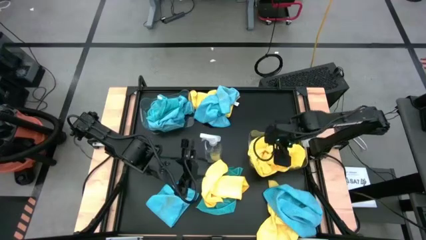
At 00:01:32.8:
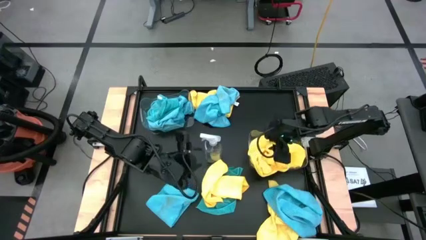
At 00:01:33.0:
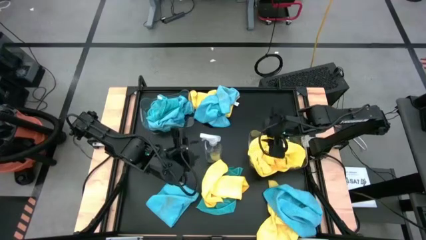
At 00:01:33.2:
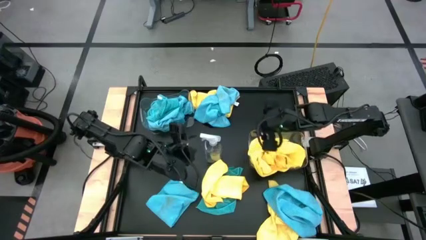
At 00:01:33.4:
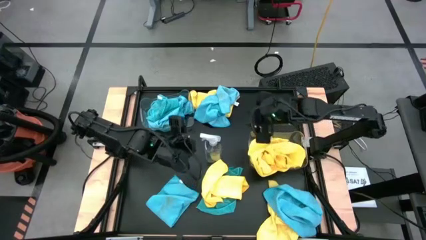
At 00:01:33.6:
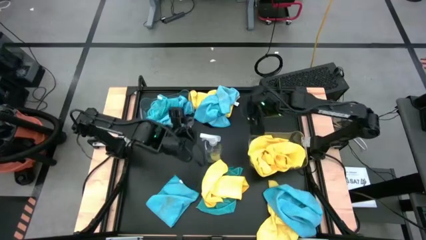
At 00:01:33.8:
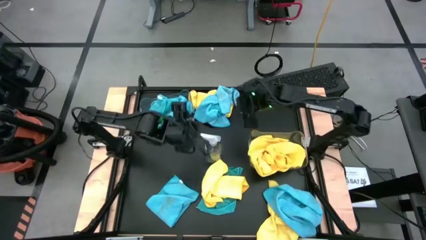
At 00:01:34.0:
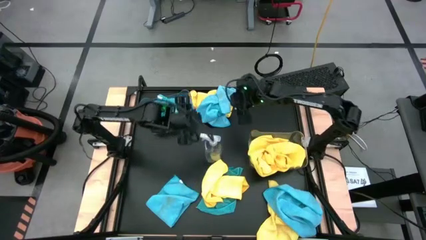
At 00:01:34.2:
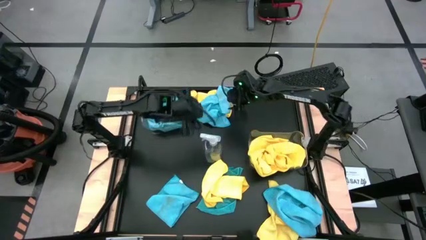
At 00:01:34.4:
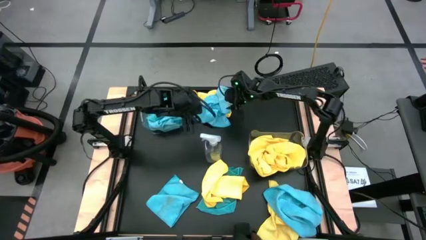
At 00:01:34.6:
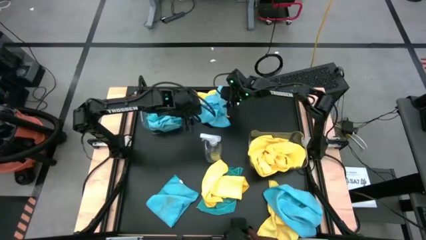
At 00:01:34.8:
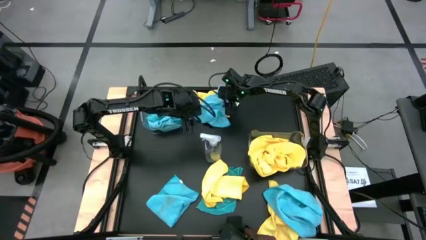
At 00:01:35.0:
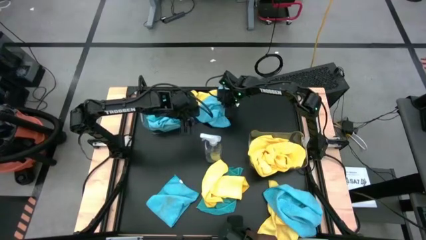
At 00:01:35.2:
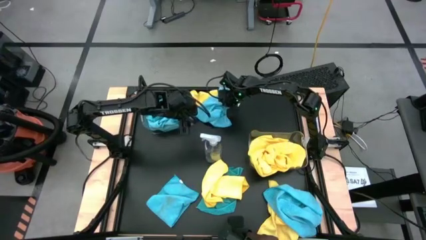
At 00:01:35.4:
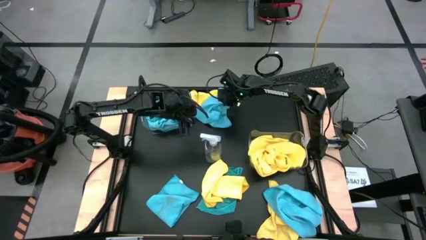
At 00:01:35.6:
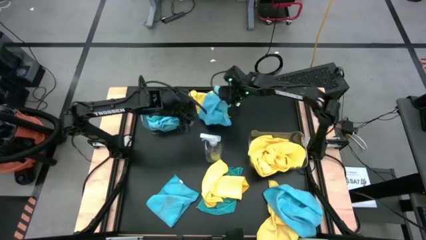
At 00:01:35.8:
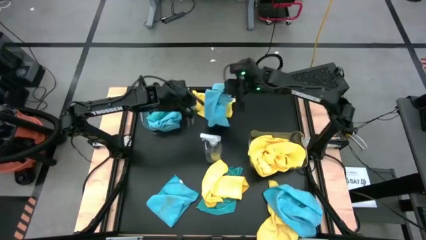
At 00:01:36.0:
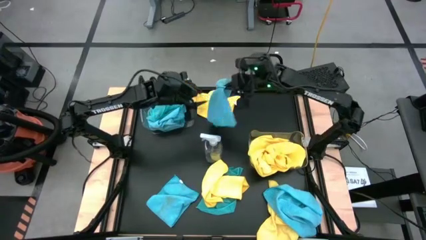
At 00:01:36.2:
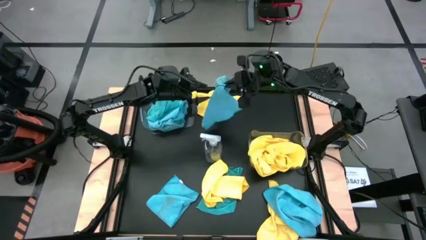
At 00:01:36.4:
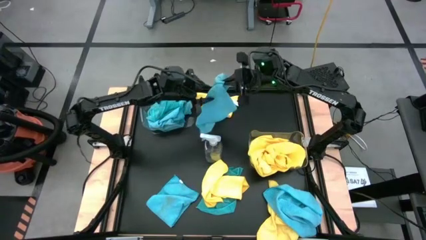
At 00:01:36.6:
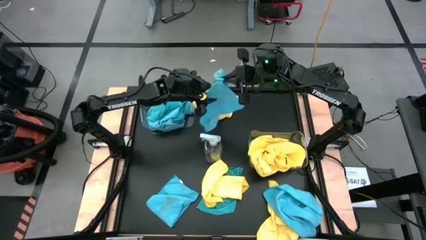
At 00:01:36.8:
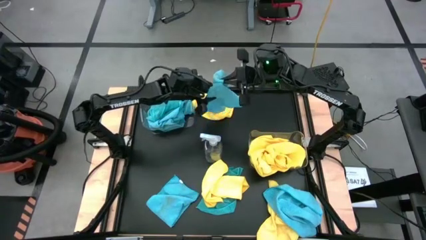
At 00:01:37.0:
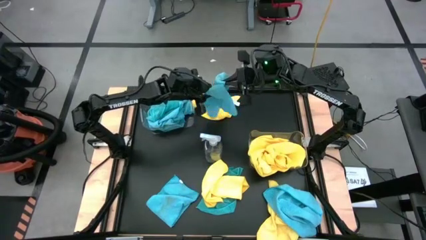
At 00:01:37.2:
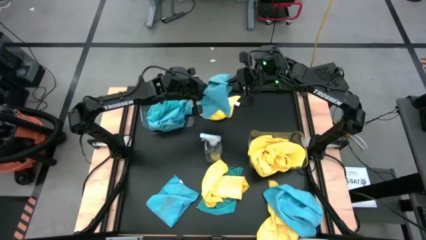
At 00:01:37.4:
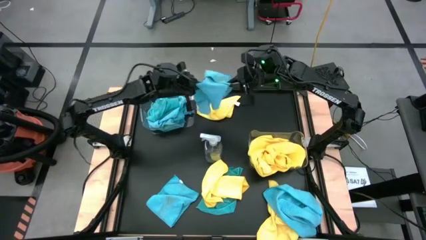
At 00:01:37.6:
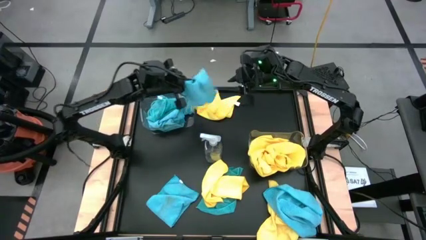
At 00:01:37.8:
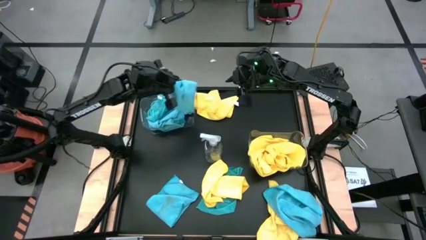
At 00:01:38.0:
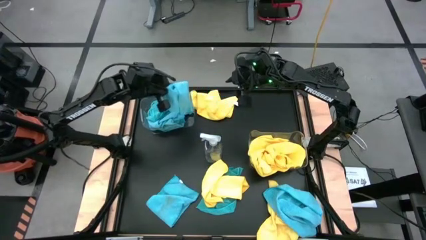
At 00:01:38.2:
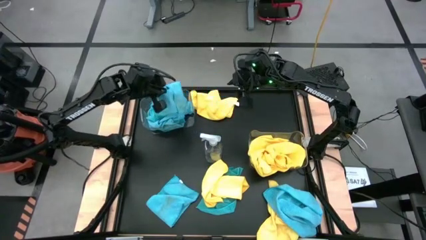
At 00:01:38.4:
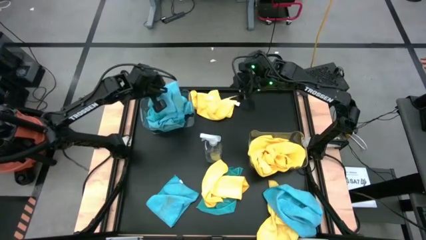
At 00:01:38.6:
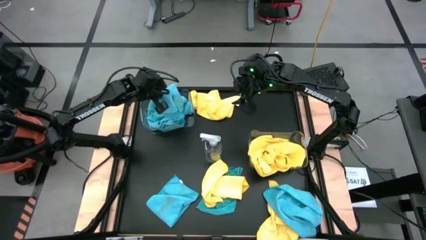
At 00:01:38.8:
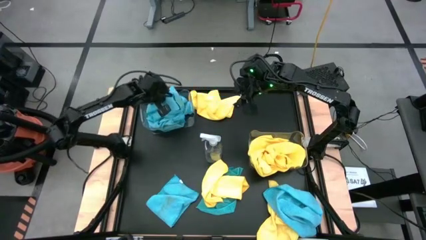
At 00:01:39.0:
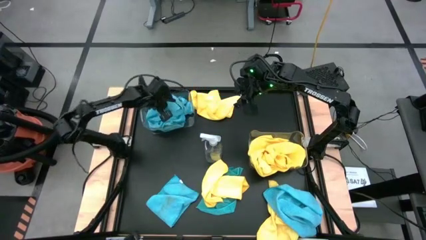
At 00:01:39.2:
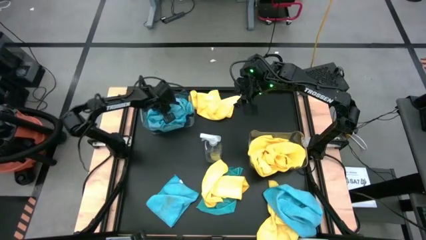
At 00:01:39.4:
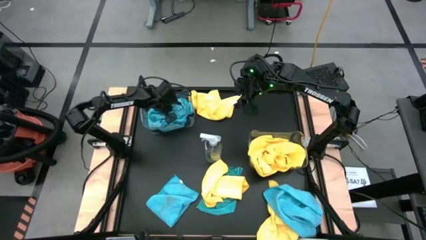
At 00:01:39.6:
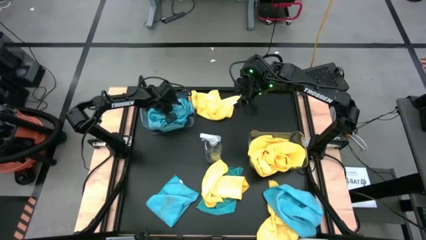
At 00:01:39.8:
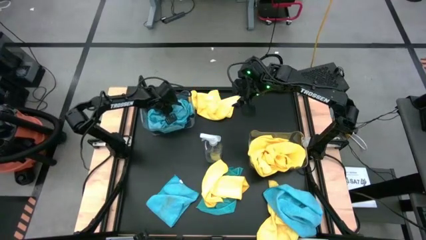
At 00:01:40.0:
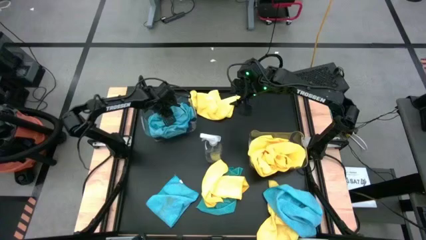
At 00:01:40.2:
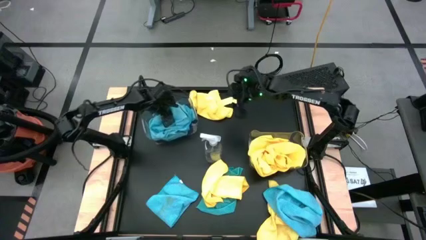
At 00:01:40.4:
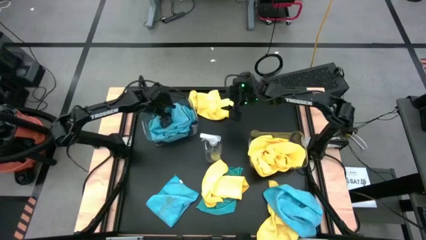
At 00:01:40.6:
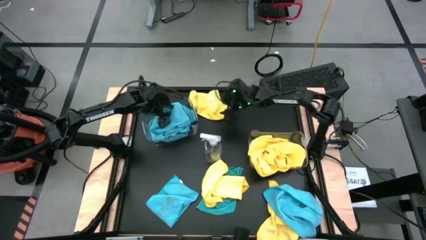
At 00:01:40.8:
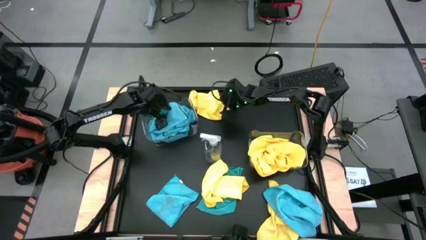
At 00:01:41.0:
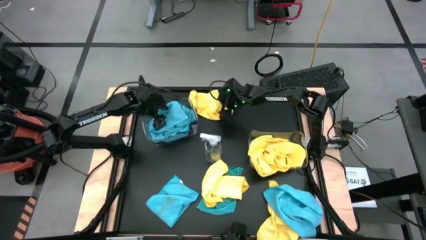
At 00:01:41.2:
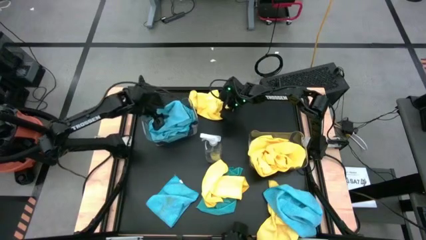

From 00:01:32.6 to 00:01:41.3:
Task: Sort microfiber towel by color & place in baskets
Put the blue microfiber towel into the top transparent bin

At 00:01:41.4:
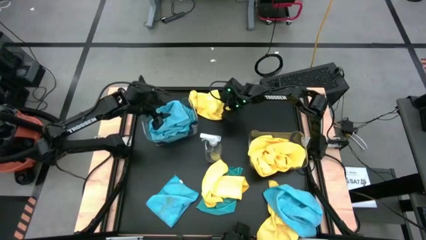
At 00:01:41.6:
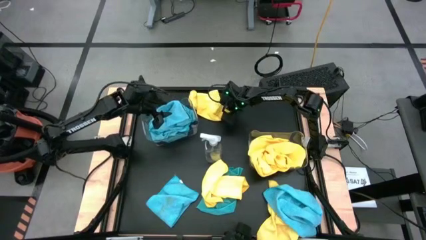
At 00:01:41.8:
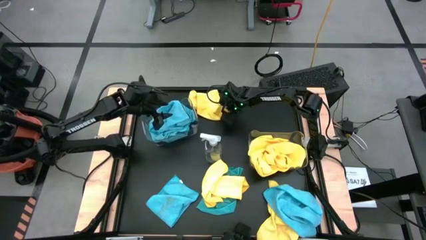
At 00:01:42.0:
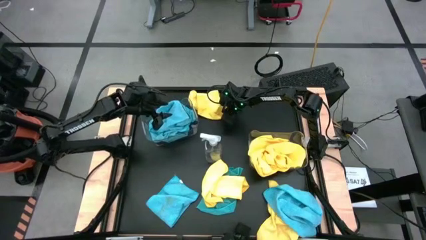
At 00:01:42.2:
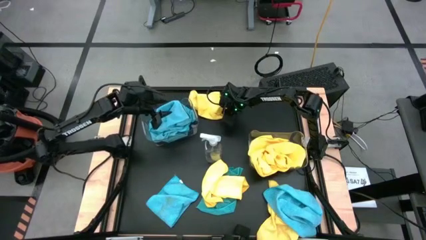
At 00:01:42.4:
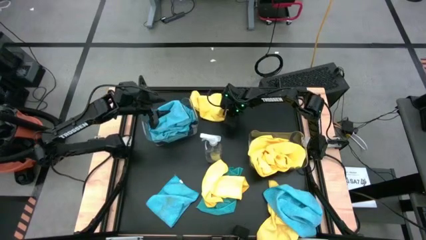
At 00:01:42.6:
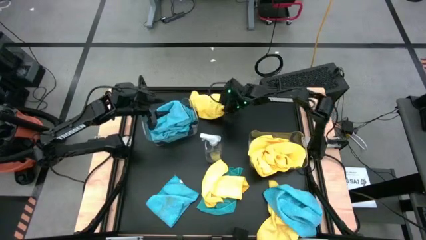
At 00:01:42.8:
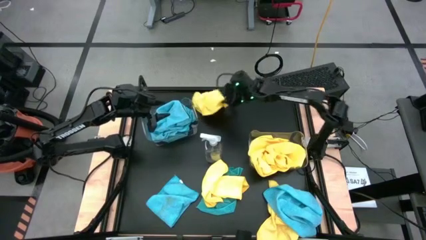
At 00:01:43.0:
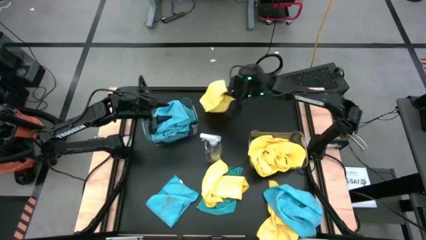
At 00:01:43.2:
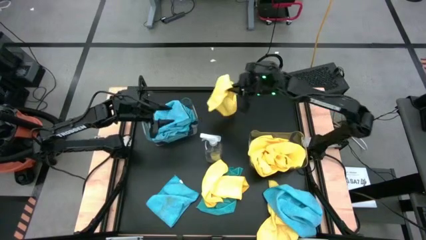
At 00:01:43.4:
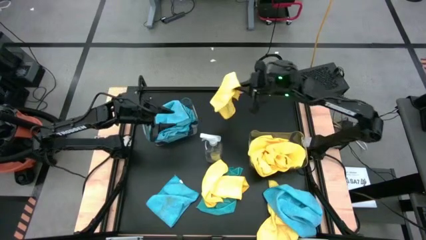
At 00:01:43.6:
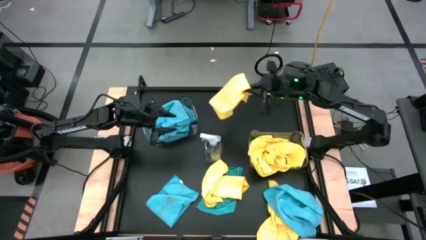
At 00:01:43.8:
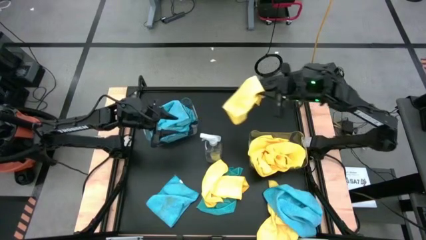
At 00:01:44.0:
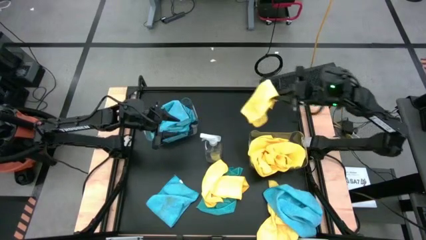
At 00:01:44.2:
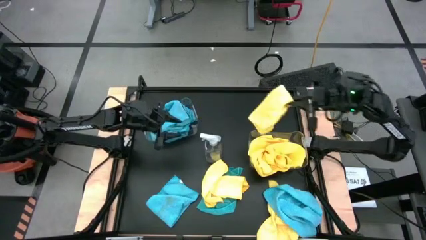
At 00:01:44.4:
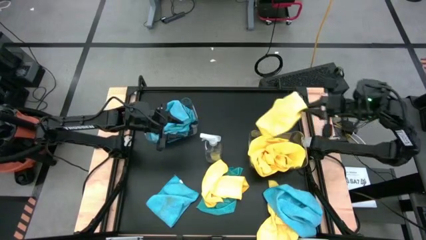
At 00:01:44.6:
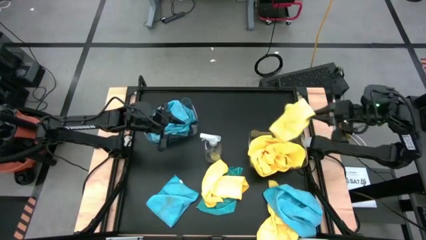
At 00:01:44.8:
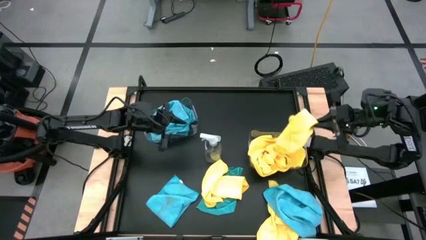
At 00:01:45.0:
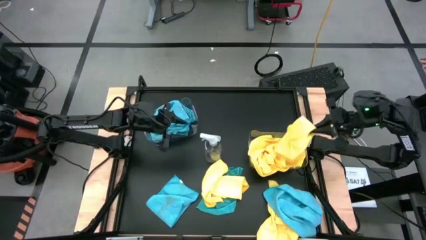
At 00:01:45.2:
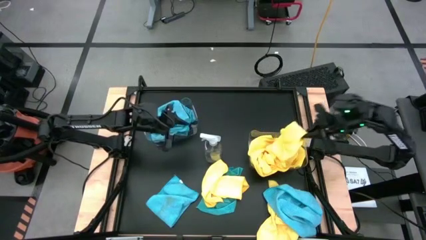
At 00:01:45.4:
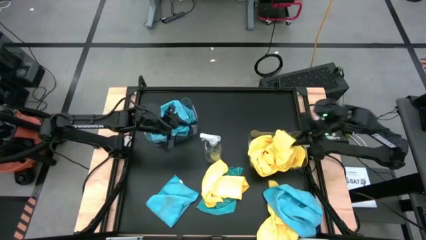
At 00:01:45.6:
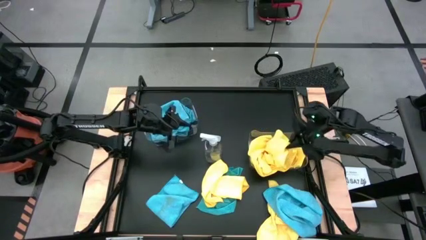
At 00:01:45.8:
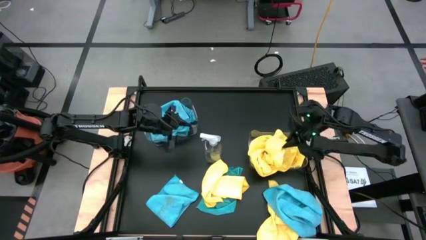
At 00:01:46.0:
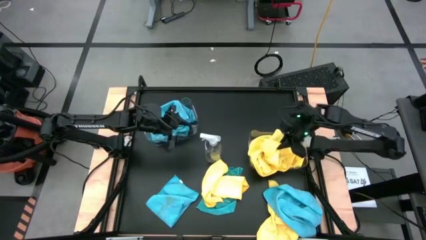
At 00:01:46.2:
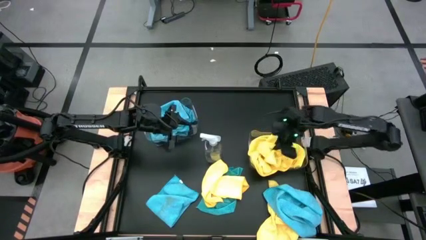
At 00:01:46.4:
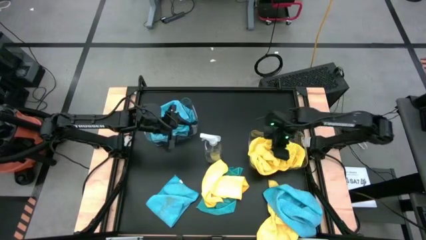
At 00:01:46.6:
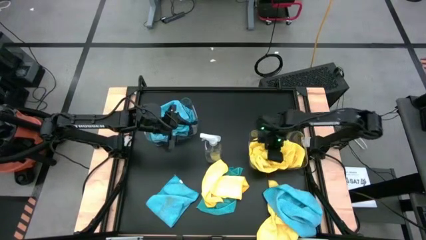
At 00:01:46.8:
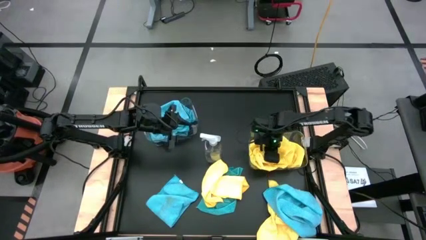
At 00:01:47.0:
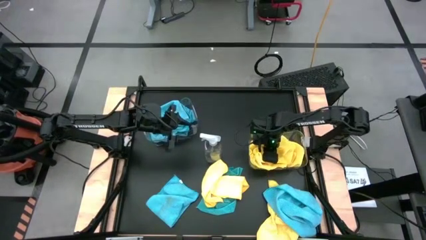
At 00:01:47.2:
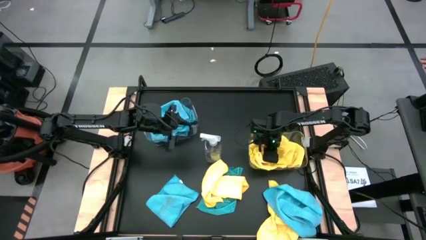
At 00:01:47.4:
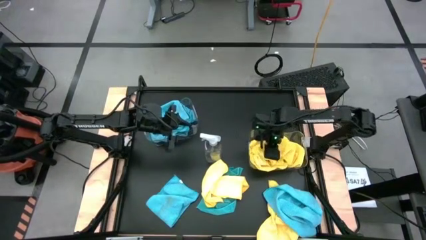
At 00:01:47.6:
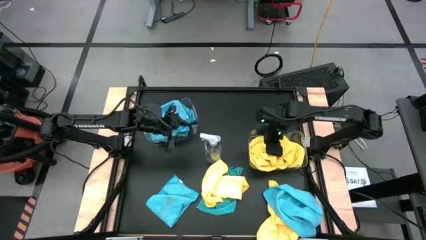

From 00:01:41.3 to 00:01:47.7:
Put the yellow microfiber towel into the bottom transparent bin
